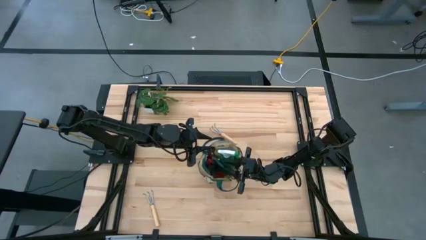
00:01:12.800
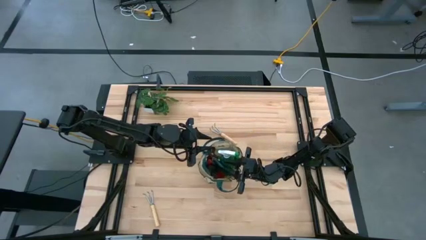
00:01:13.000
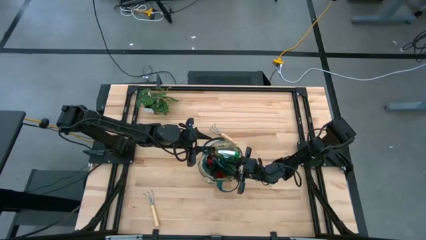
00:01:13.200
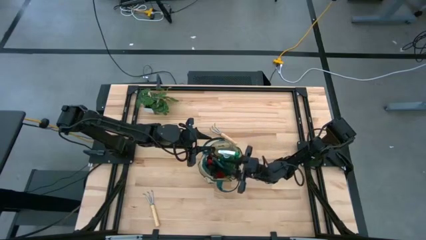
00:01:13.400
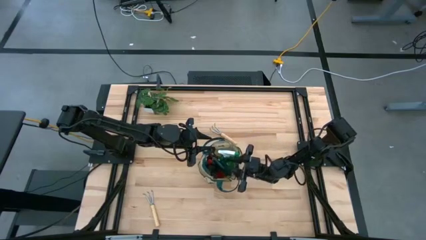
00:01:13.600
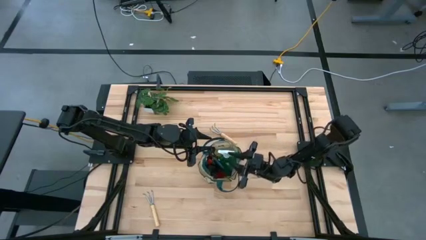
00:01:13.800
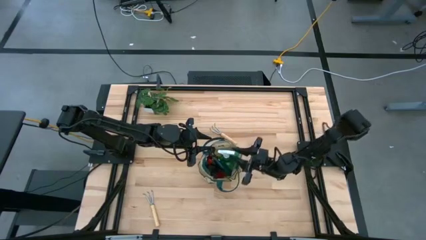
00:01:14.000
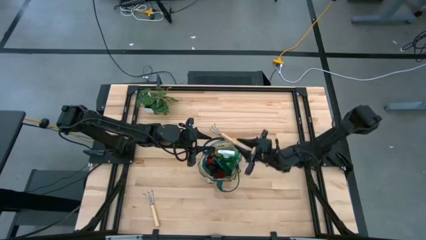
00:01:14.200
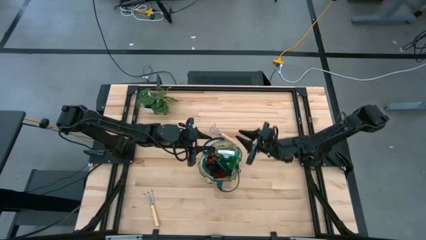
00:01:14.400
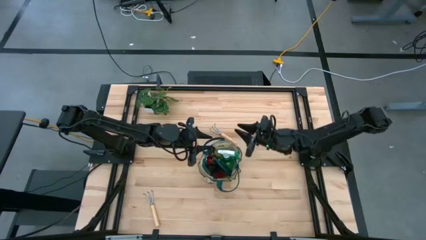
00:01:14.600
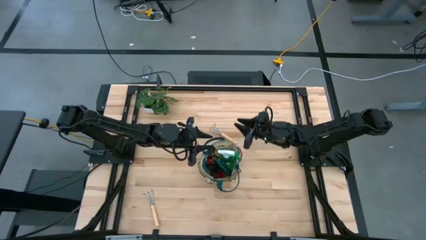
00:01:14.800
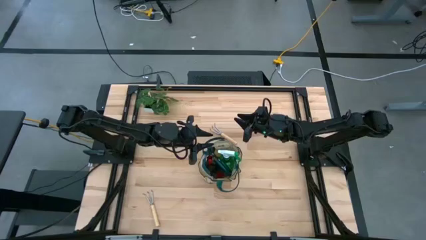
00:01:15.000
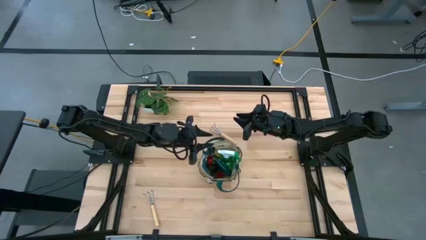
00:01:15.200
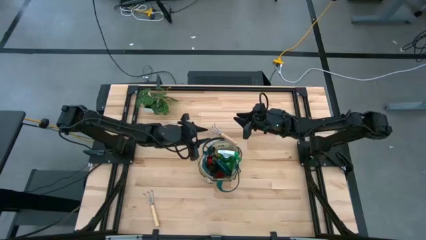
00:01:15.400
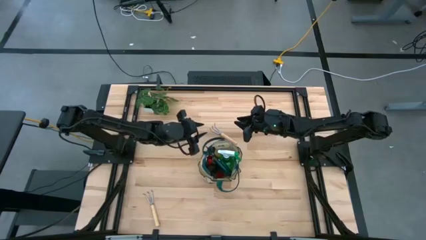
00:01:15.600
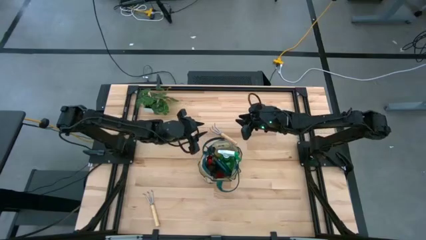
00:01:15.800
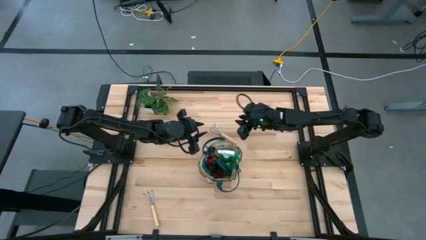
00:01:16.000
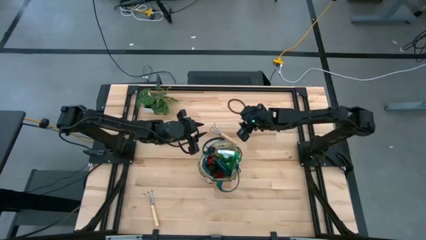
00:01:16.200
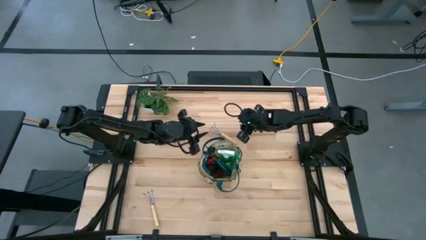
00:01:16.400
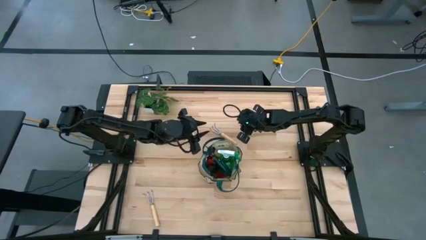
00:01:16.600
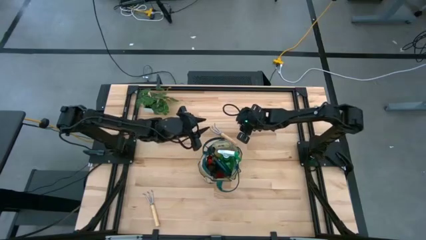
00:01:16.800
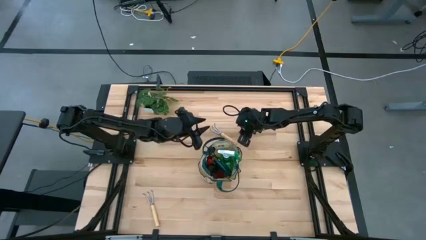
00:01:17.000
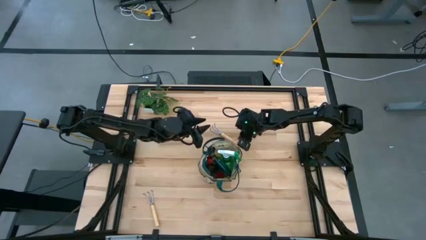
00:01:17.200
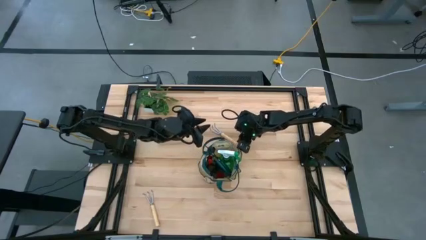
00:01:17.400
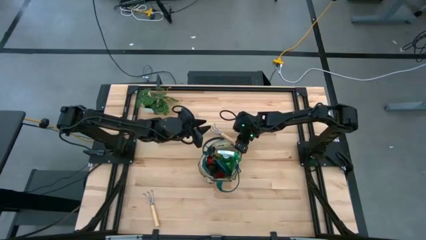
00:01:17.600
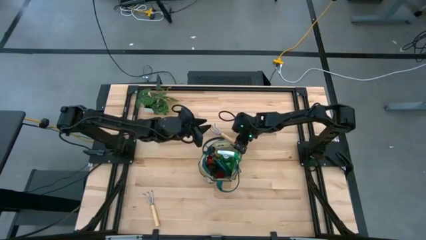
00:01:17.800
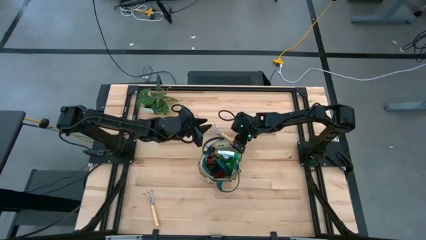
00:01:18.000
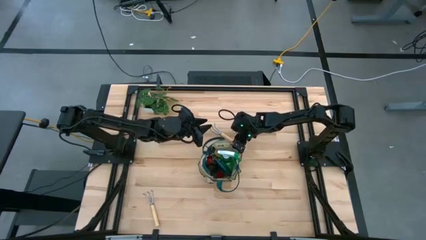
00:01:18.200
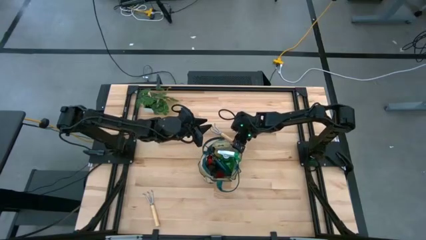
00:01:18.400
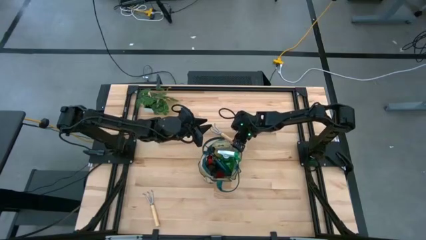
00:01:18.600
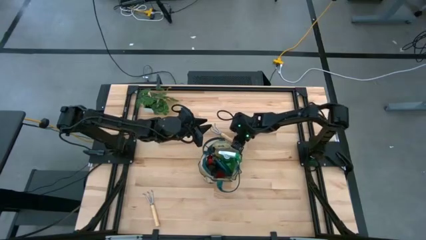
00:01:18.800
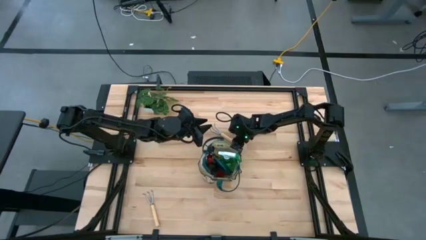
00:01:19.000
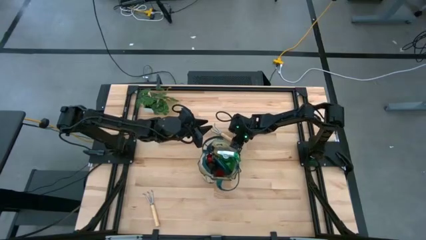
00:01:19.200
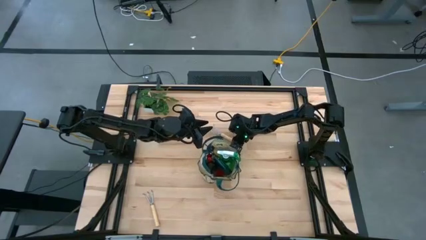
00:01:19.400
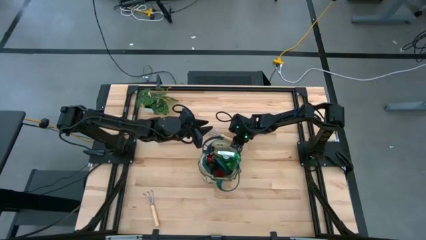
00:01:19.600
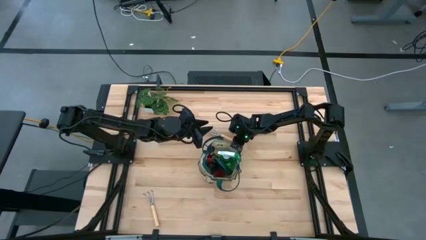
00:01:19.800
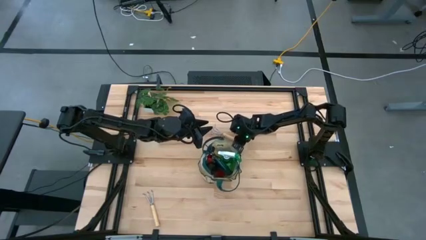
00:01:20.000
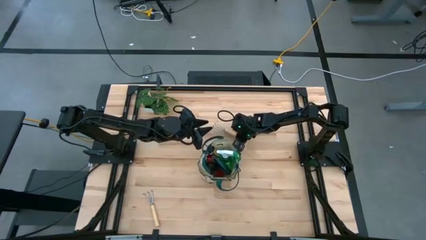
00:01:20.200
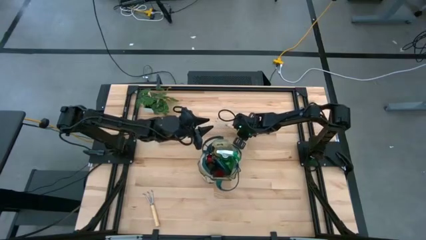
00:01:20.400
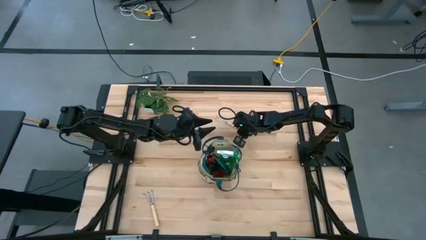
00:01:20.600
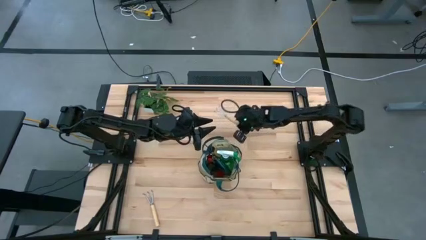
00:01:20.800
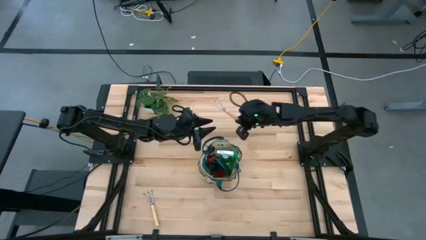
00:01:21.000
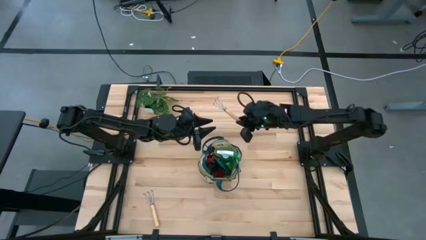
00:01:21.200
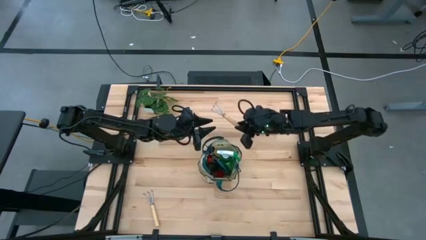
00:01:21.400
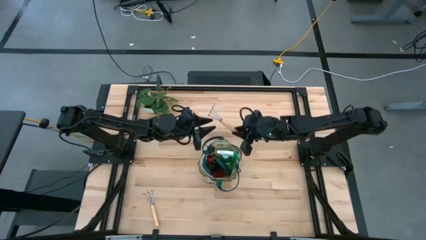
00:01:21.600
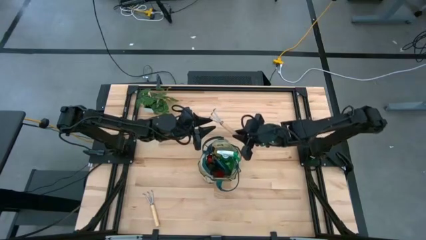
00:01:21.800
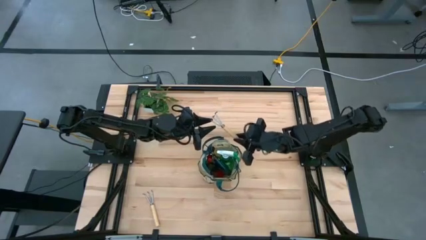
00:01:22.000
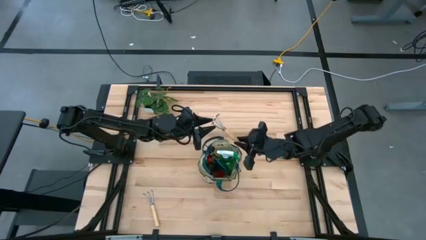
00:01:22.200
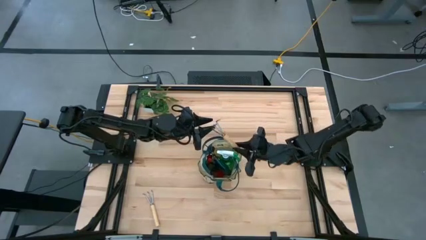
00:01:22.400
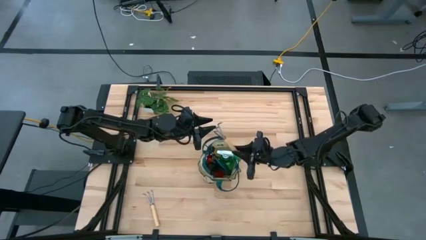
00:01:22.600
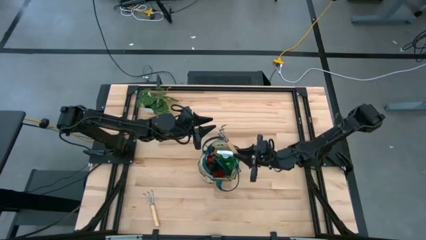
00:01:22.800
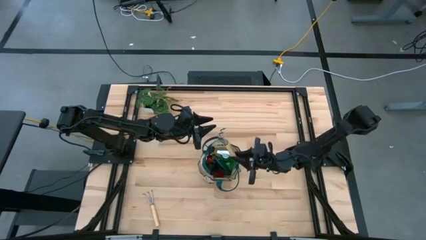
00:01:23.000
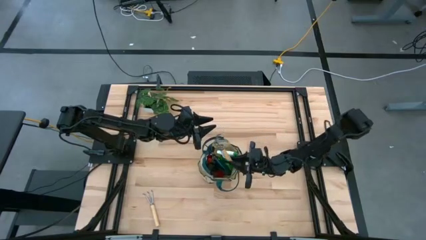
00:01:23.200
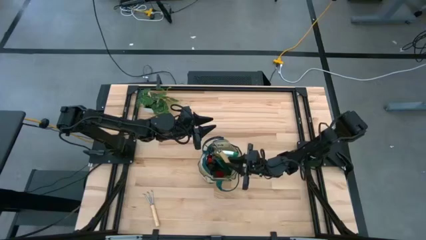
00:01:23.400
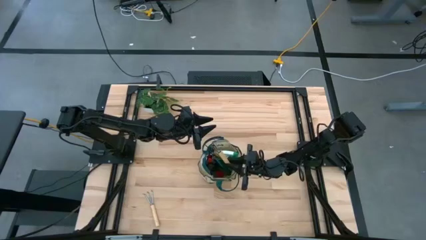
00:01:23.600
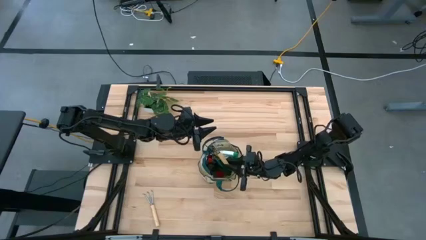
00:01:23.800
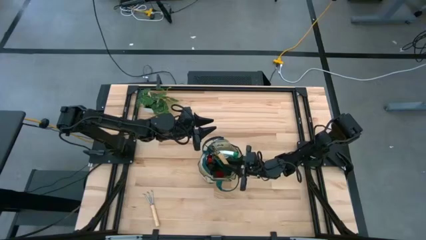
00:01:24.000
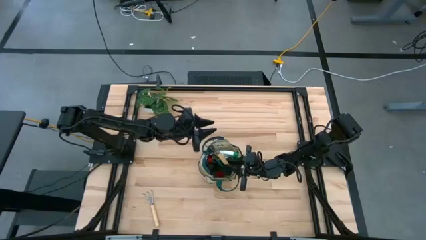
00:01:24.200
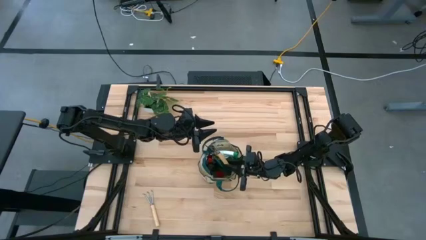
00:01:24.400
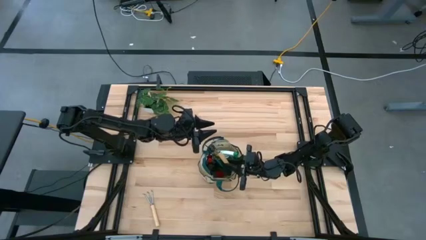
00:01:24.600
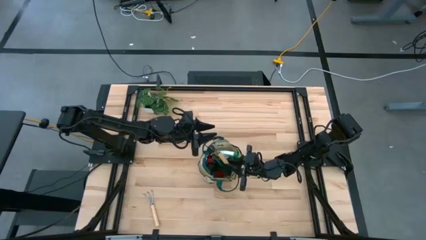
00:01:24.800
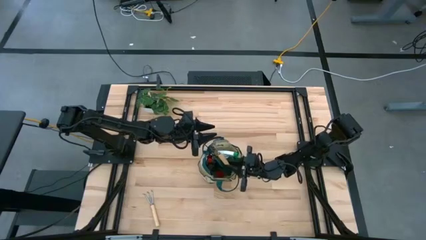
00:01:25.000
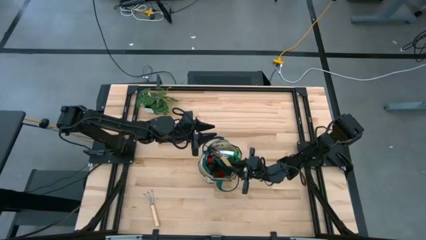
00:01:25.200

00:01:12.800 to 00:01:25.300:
Task: Pick & Place Garden tools in Gardening bag
Put the light brown rake into the green gardening bag

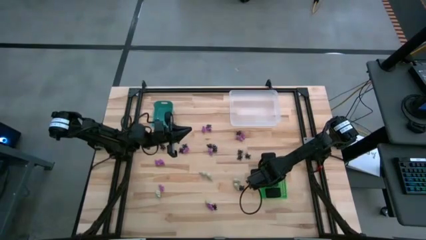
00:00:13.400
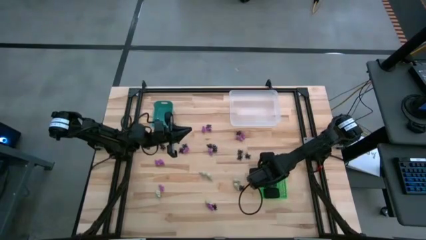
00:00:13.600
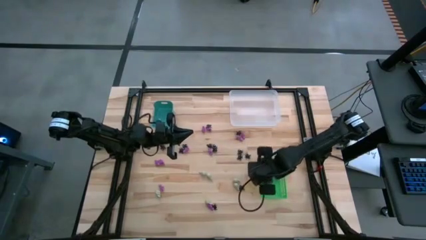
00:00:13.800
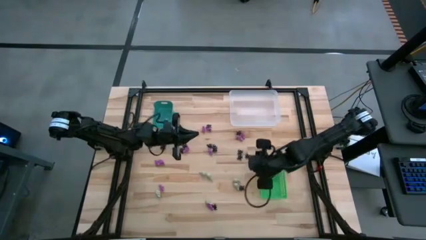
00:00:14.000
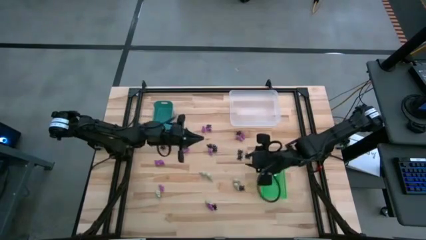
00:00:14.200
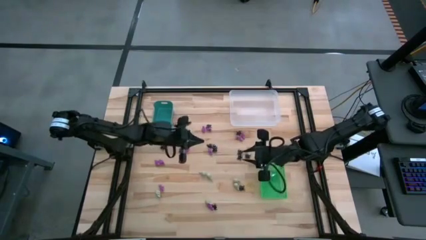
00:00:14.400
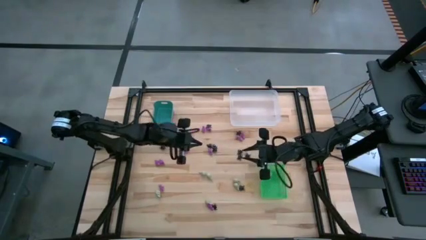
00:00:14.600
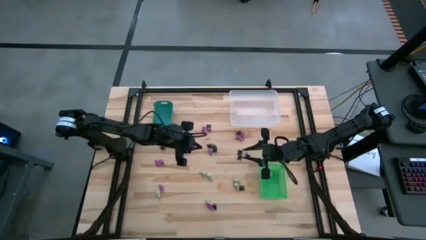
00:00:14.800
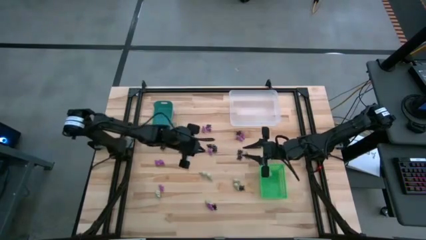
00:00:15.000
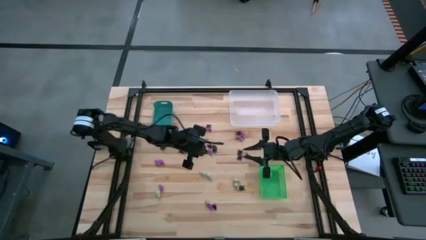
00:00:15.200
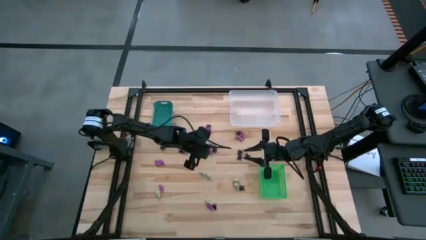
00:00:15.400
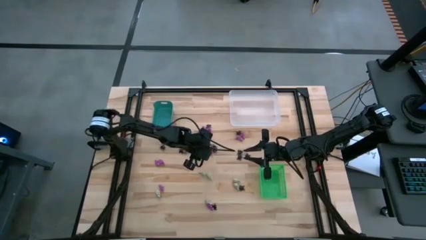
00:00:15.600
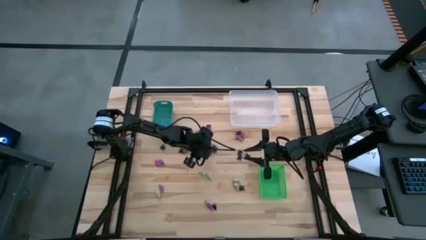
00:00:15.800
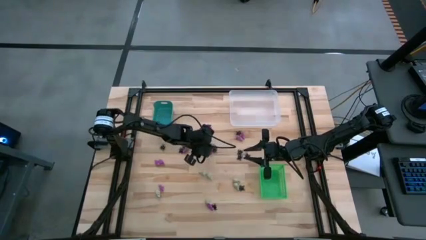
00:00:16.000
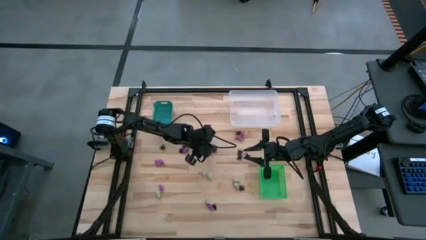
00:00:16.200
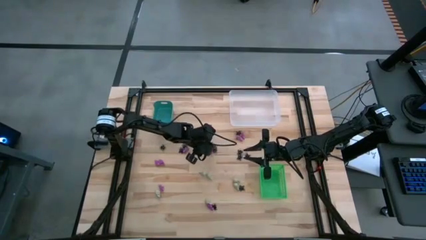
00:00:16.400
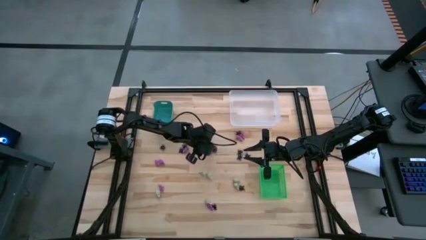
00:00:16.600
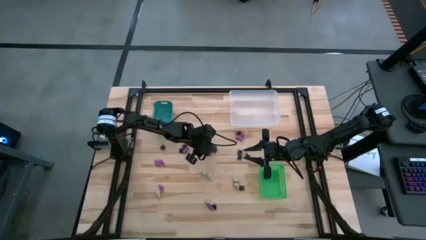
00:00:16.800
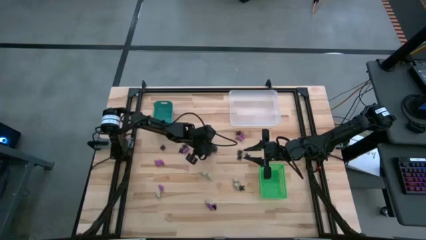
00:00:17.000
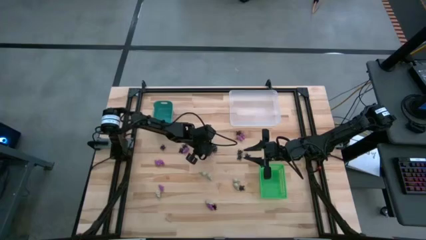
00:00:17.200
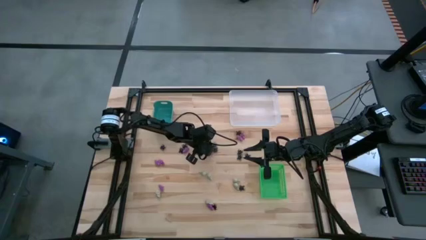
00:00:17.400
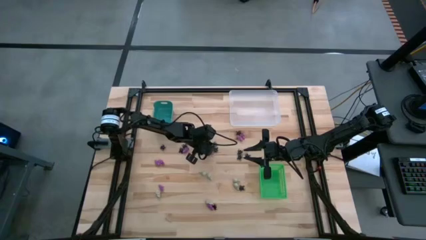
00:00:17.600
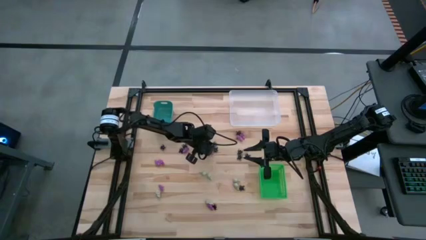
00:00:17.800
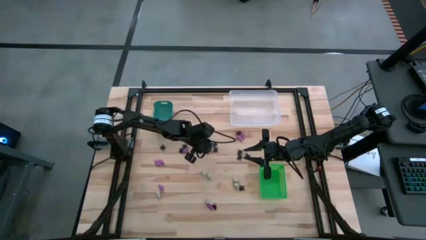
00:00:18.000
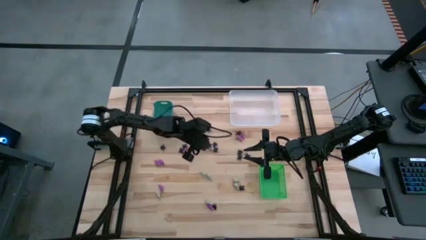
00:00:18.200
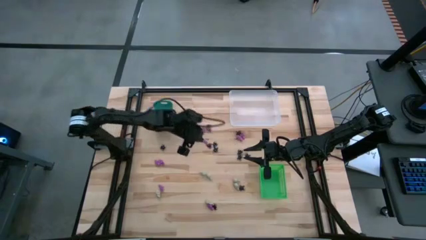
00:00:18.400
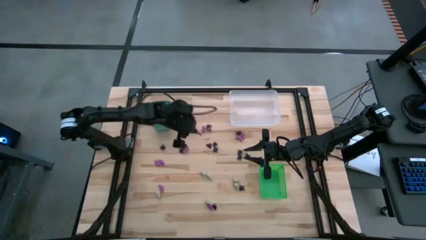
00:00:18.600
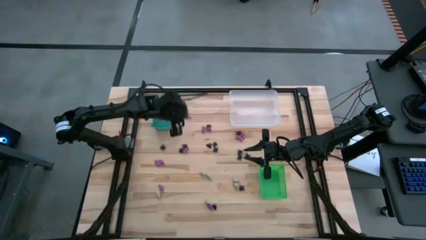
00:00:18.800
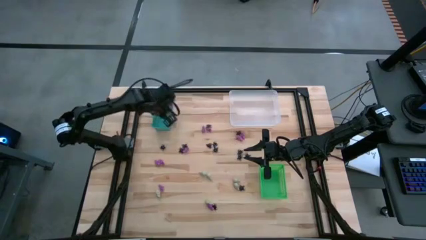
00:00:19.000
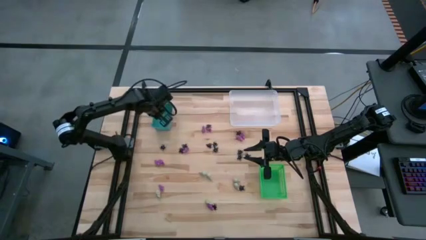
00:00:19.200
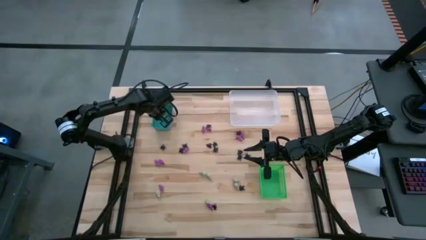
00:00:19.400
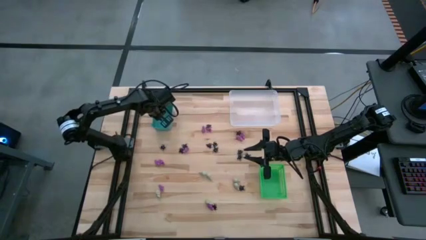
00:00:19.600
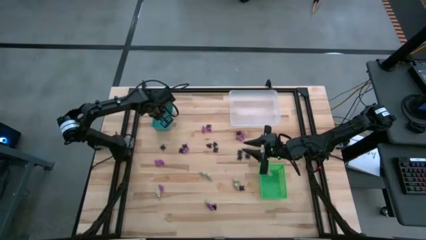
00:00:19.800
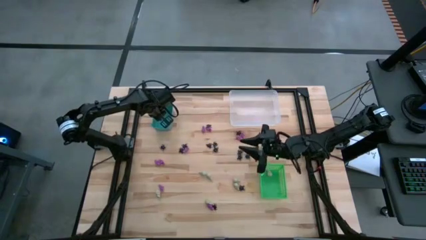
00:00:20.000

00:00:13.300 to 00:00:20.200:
Task: Sort Halloween decoration
Put the purple skeleton toy into the blue bin
